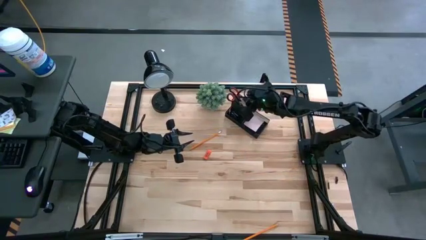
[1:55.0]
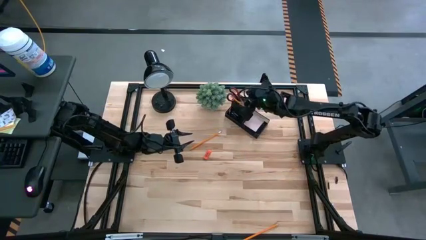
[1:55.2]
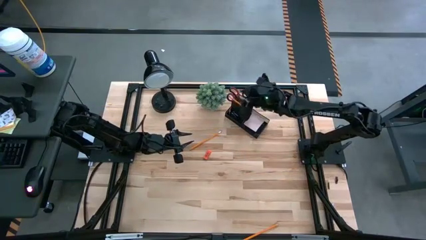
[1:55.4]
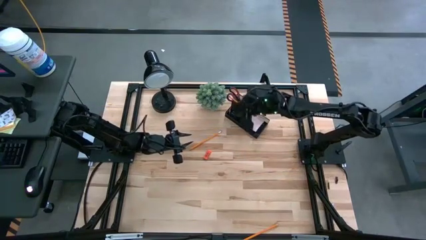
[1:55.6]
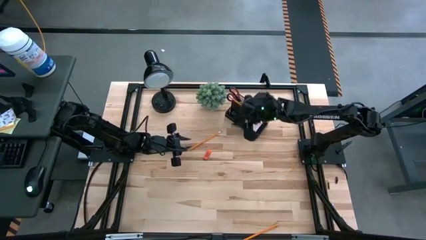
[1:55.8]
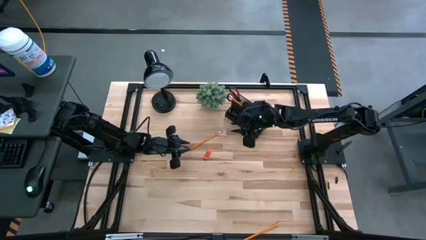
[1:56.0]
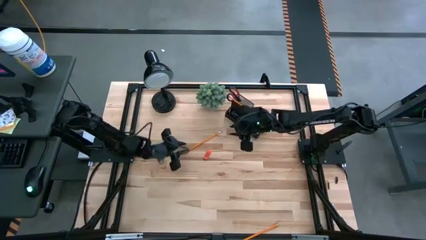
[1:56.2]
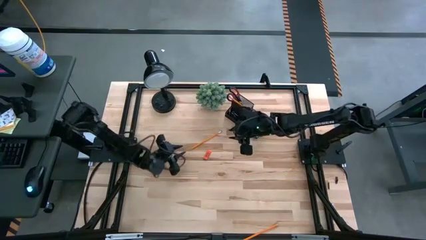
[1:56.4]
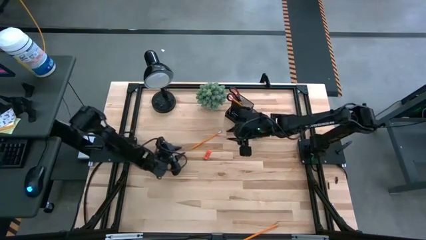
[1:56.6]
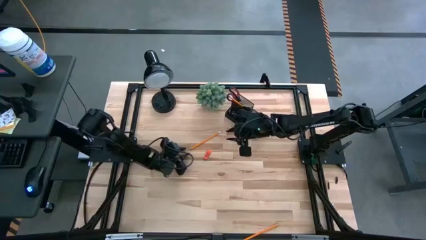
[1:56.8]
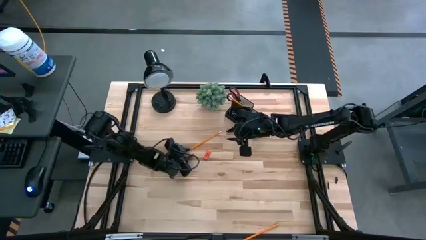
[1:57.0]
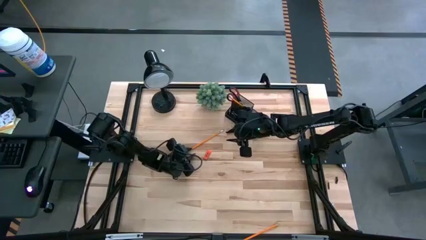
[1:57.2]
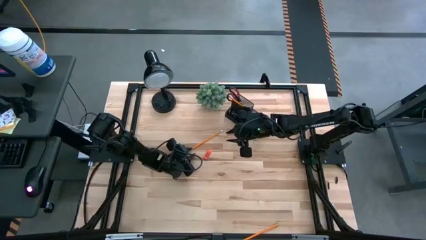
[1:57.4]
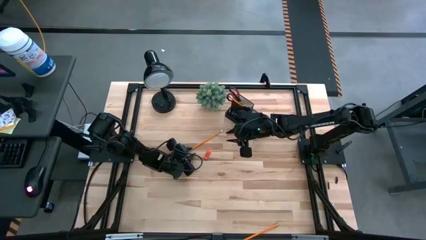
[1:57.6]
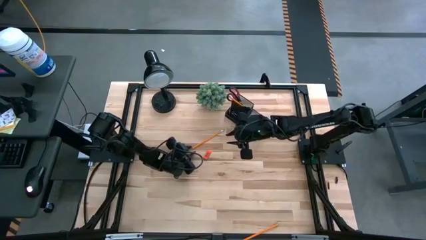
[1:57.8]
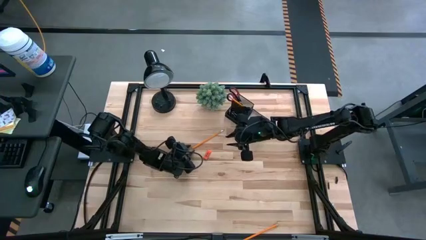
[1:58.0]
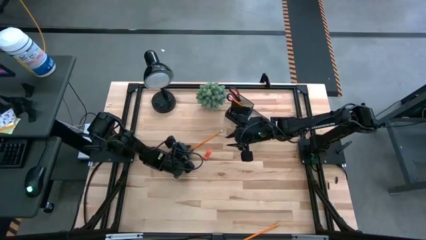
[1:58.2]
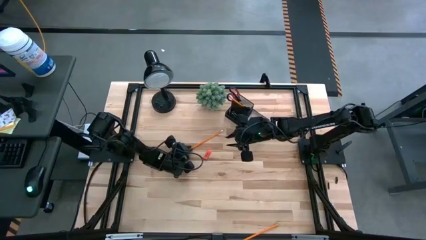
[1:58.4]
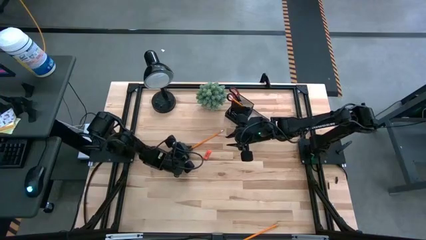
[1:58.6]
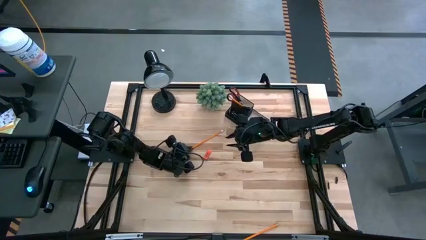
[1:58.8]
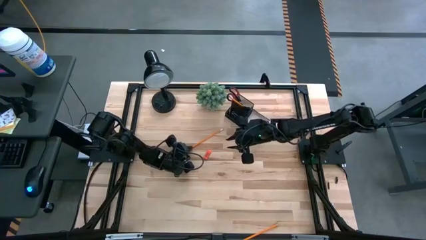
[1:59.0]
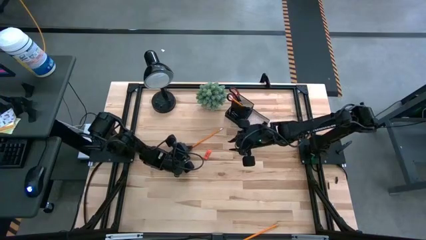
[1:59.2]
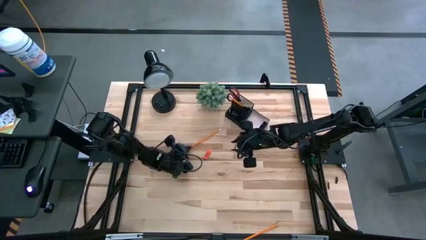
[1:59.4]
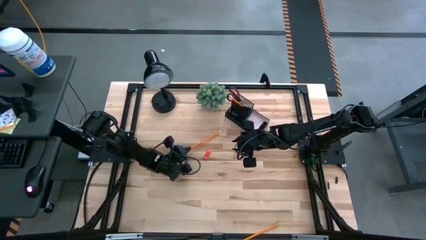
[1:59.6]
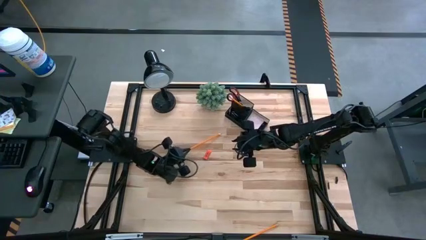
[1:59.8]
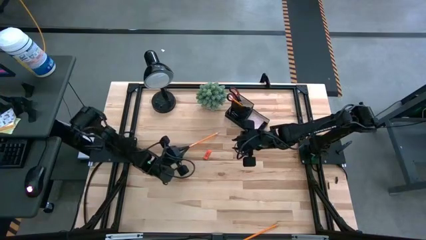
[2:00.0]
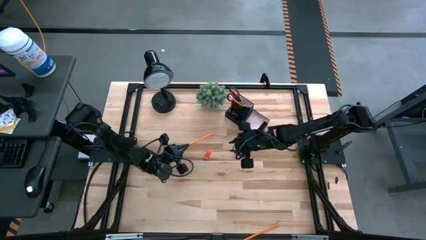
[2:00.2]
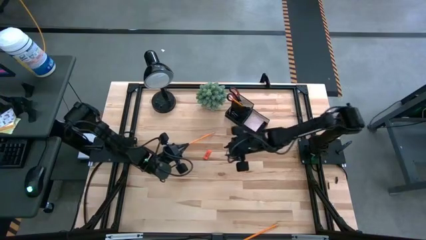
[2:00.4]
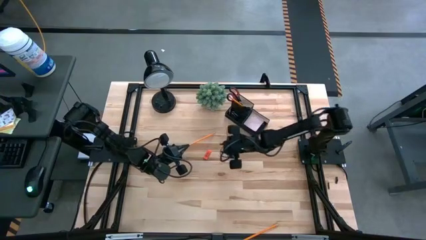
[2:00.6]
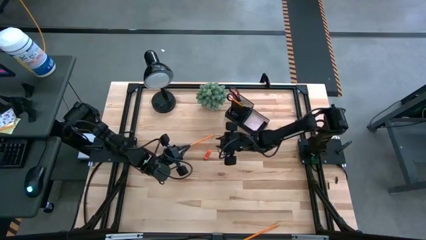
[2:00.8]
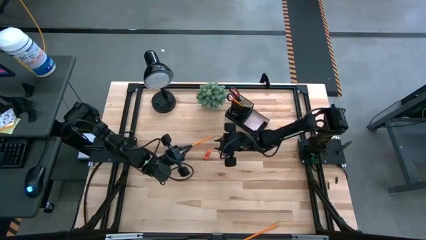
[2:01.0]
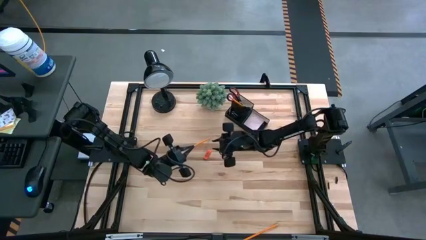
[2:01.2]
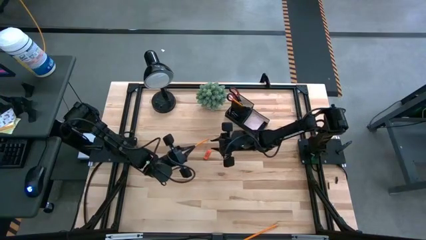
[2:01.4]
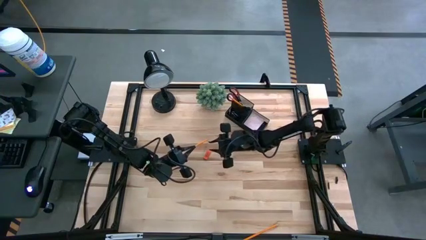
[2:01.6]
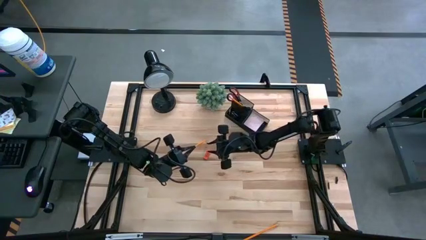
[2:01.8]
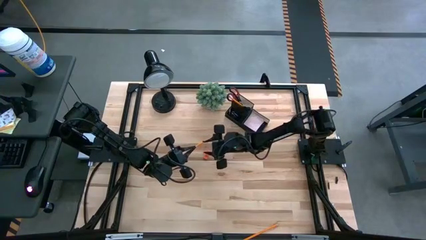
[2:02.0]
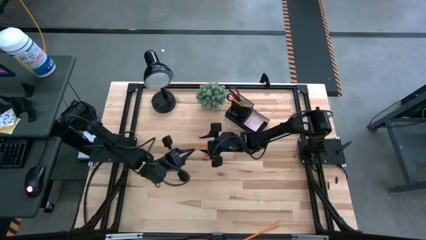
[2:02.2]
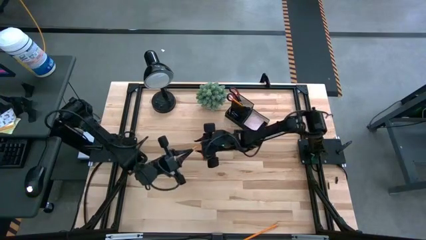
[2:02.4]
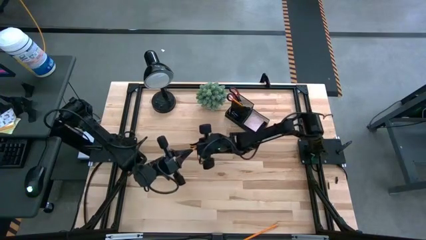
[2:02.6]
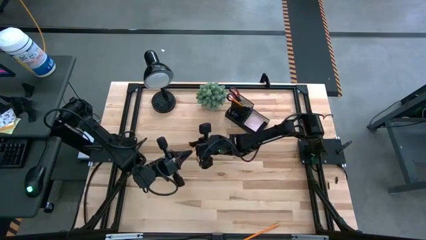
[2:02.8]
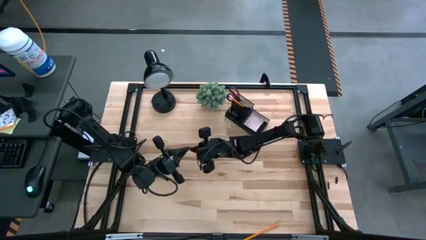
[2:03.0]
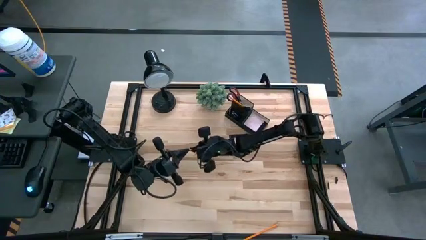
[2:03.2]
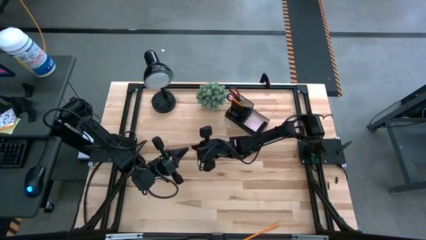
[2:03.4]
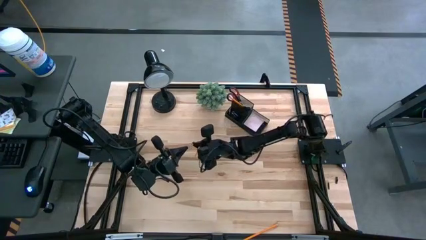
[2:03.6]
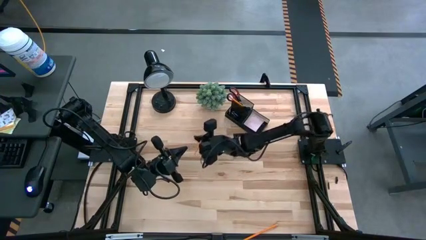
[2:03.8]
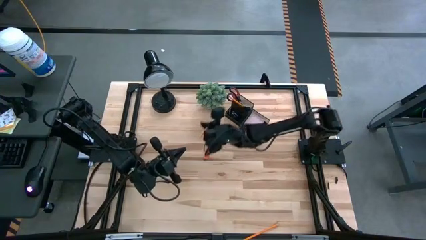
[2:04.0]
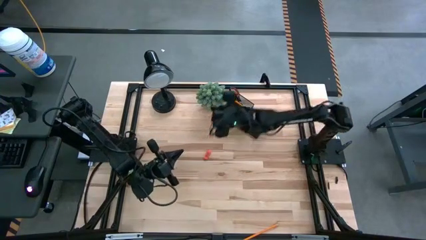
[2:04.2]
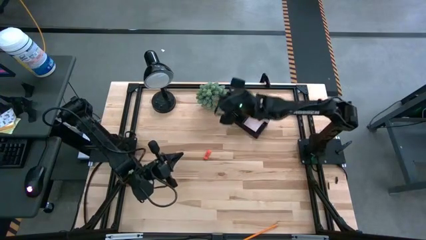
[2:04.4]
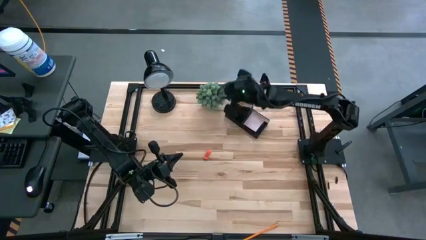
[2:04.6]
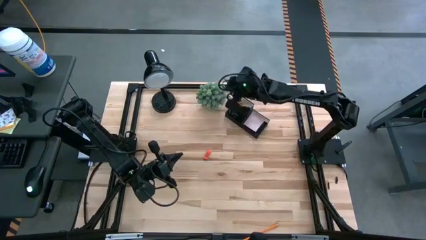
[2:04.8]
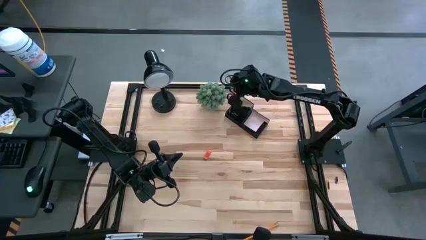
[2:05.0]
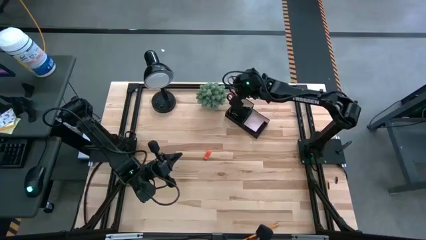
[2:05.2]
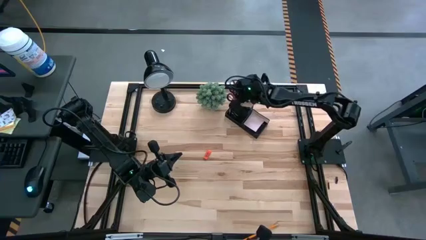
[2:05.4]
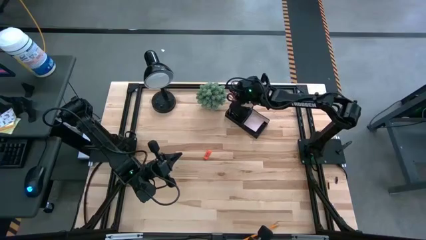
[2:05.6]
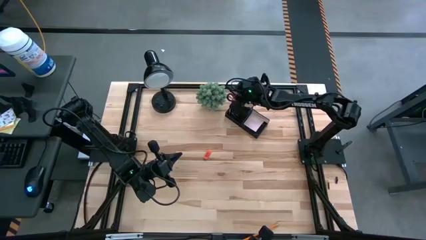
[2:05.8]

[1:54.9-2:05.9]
Task: Pick and place office supplies into organizer
Put the top yellow pencil into the black desk organizer

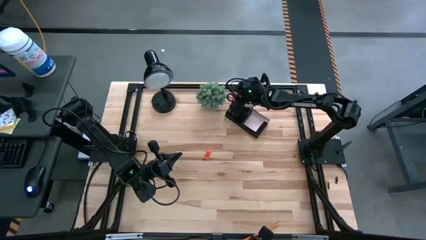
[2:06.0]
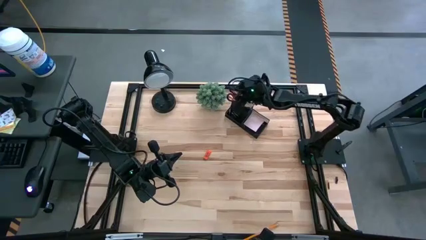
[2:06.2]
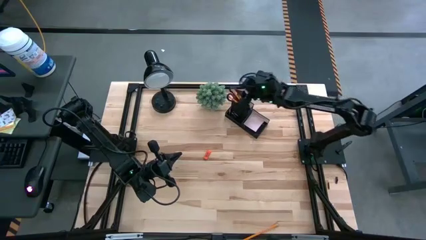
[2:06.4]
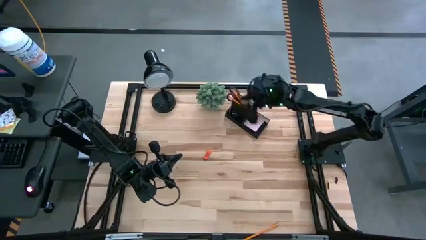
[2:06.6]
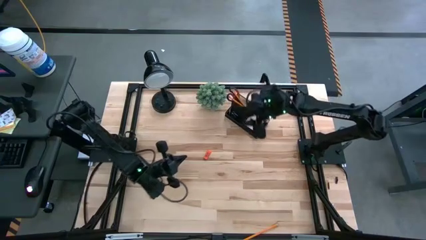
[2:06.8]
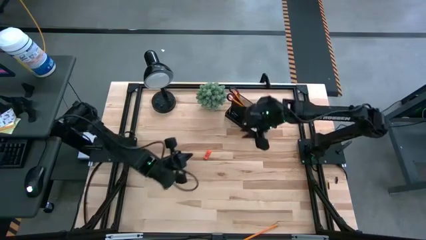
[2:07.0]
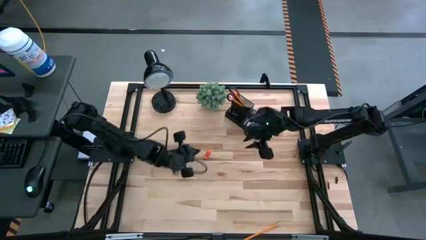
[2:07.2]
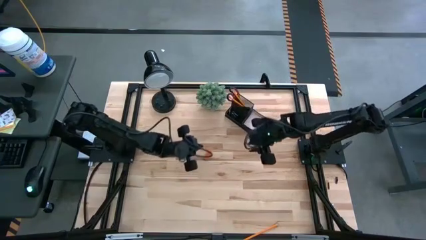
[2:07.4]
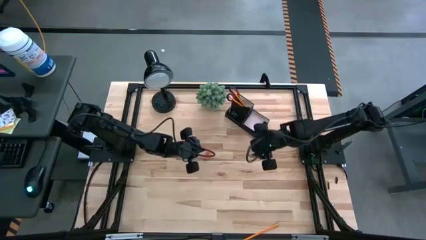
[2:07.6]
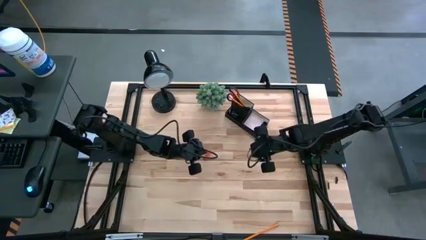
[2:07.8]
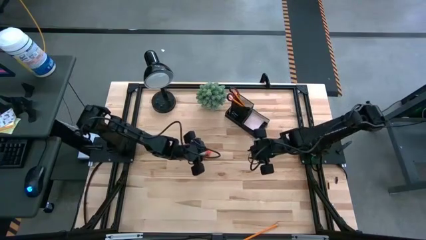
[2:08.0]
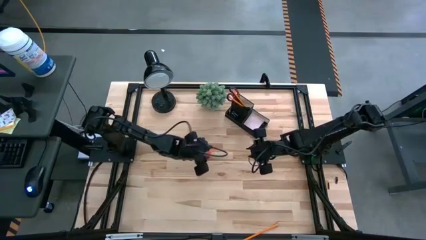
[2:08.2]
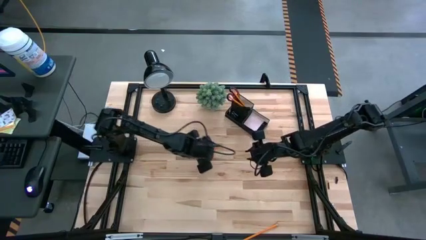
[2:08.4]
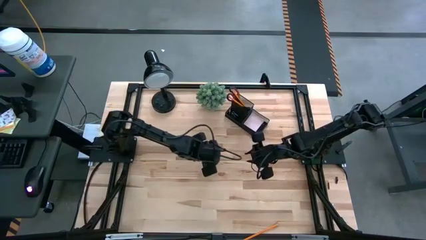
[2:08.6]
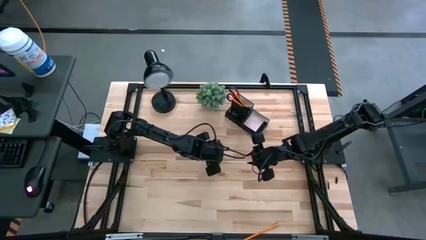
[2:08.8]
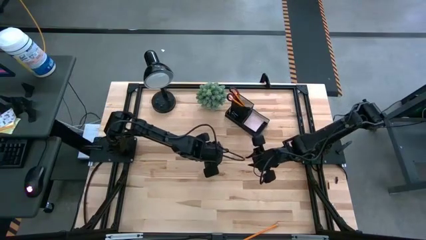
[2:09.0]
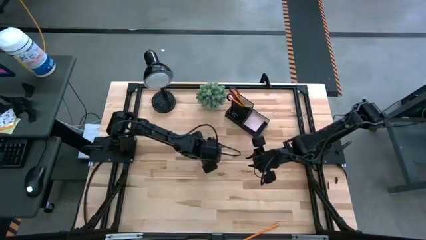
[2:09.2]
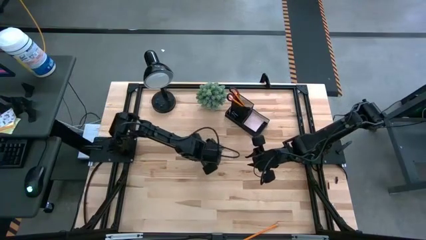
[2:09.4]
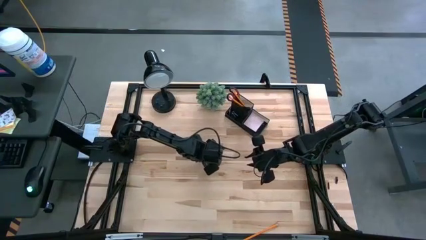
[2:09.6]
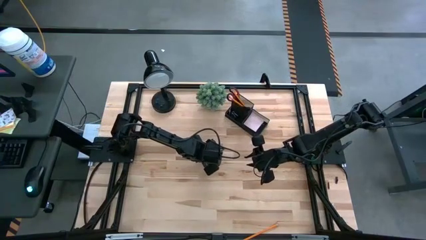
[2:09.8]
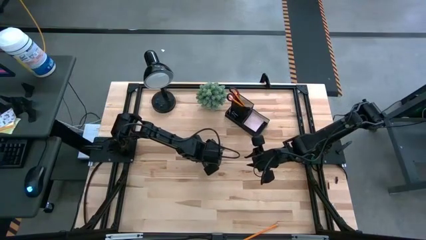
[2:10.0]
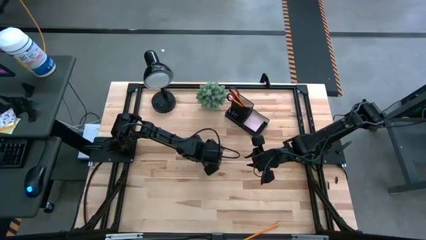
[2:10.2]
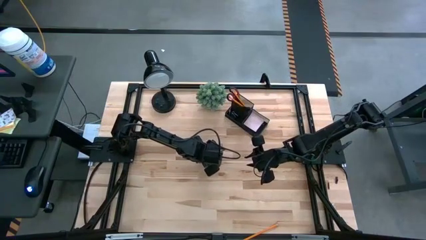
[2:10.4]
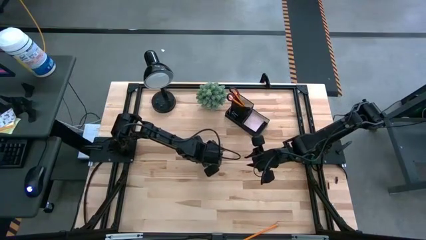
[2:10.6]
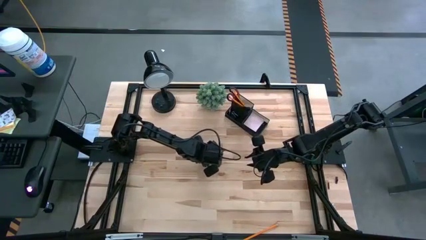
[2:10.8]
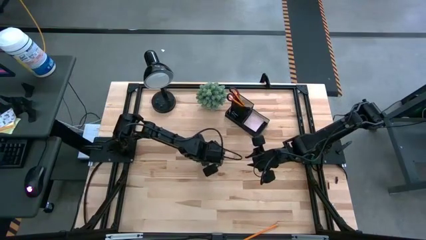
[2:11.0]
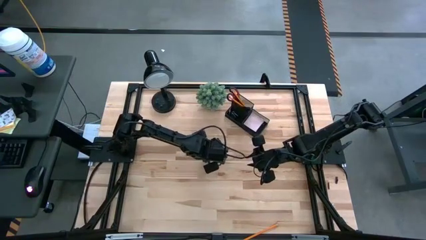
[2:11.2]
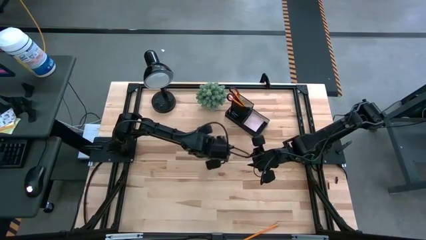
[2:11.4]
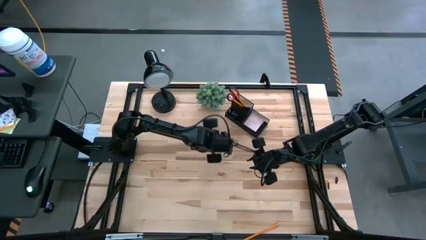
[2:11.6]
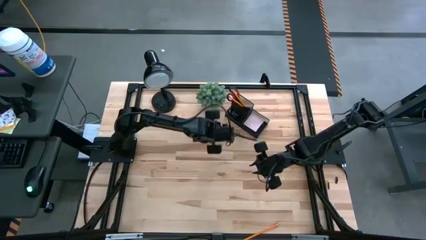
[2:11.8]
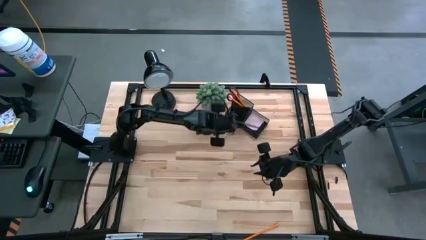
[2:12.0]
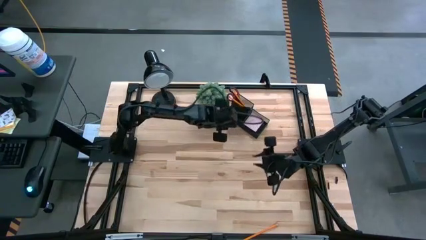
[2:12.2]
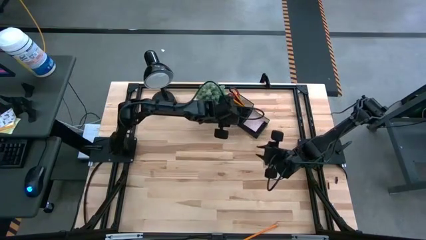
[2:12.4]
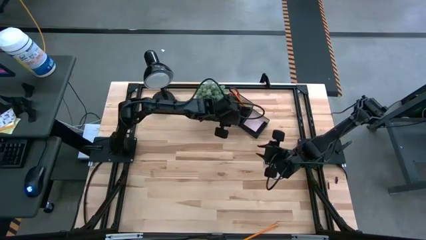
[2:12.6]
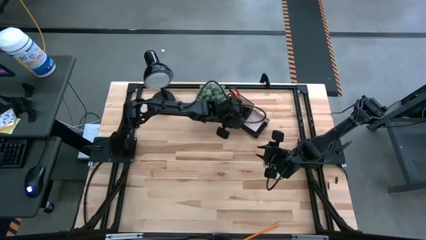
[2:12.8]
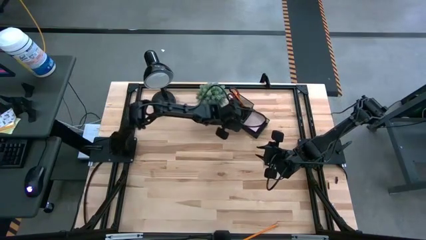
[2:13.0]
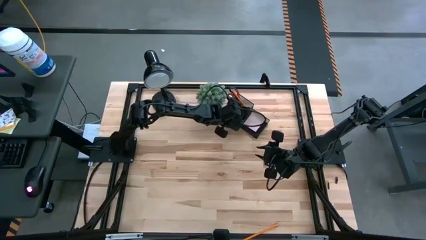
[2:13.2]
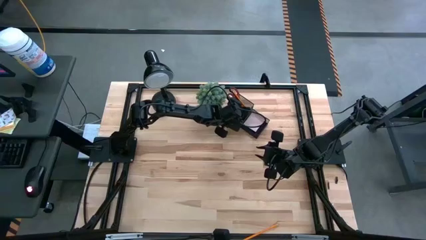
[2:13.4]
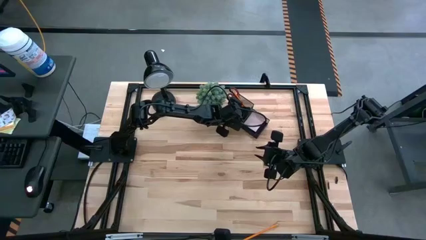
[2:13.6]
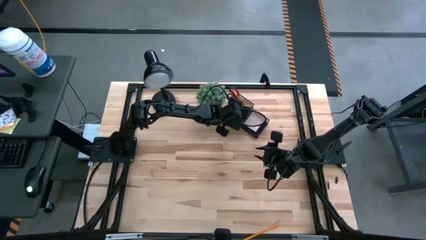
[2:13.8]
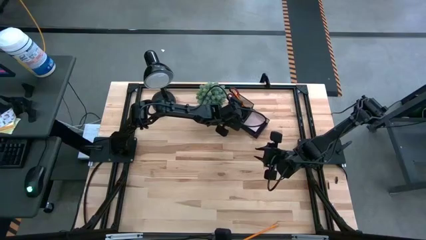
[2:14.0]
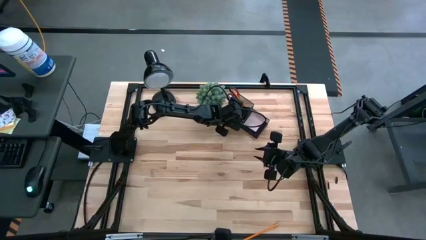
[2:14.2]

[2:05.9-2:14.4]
Put the orange eraser into the black desk organizer
